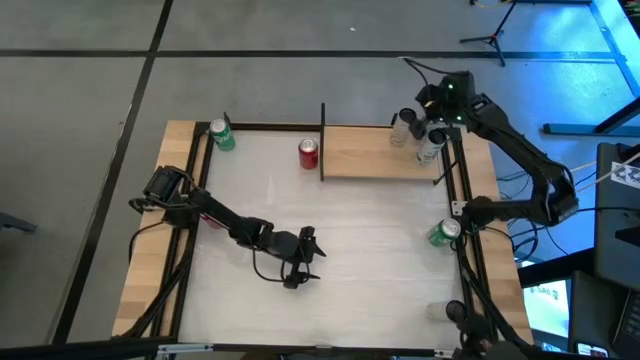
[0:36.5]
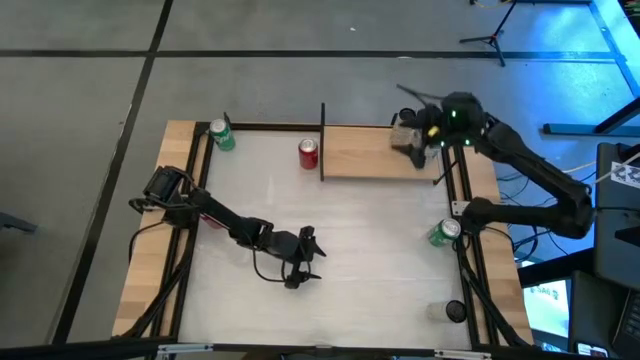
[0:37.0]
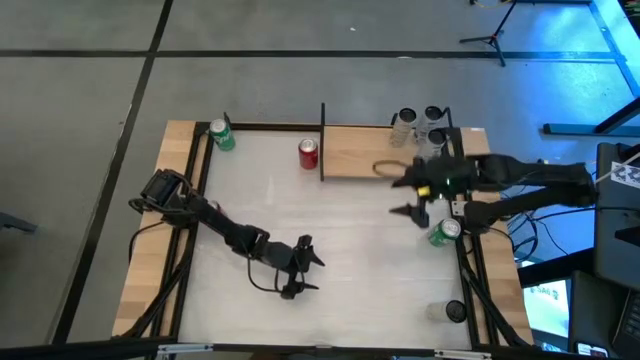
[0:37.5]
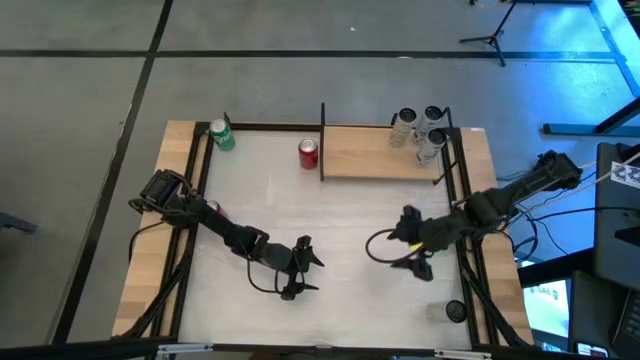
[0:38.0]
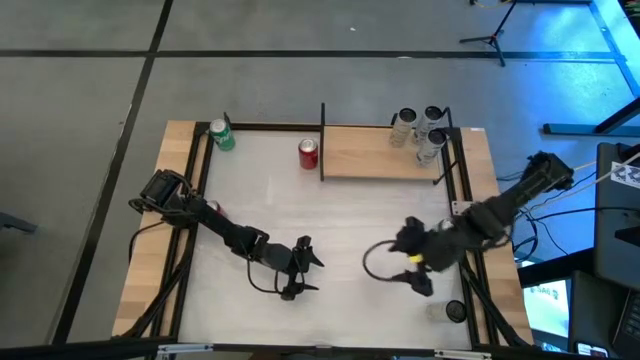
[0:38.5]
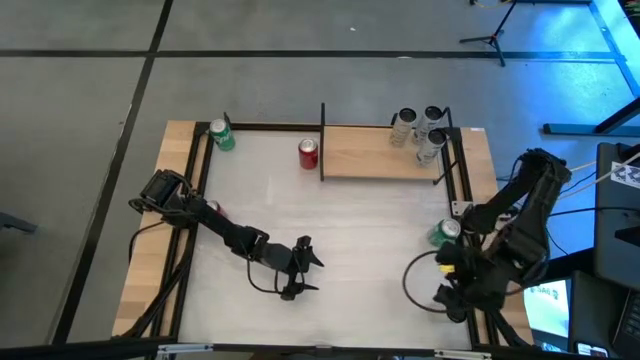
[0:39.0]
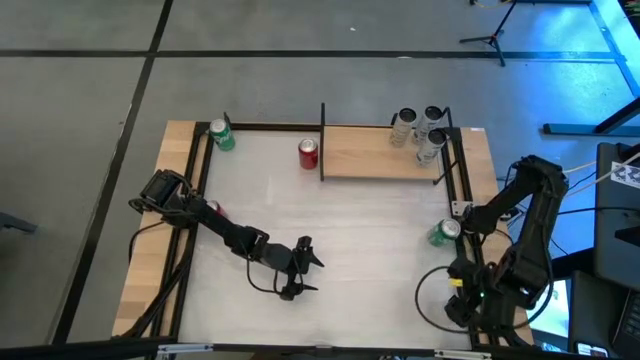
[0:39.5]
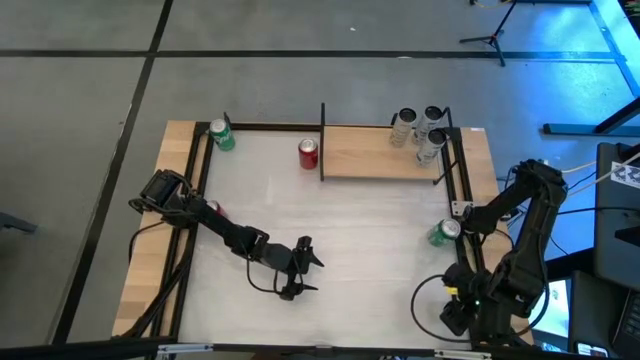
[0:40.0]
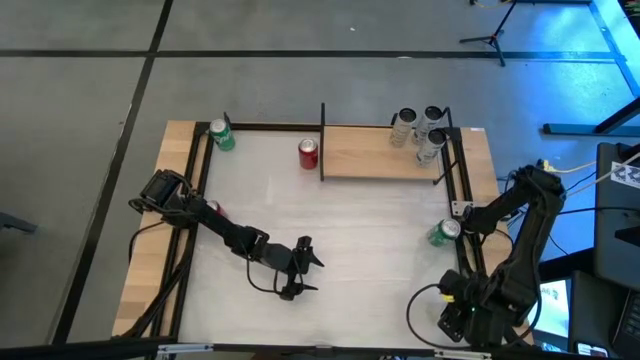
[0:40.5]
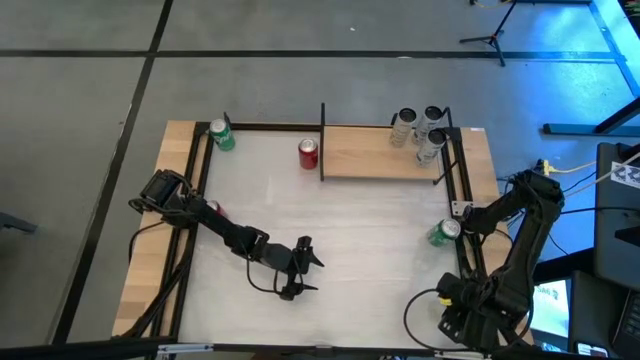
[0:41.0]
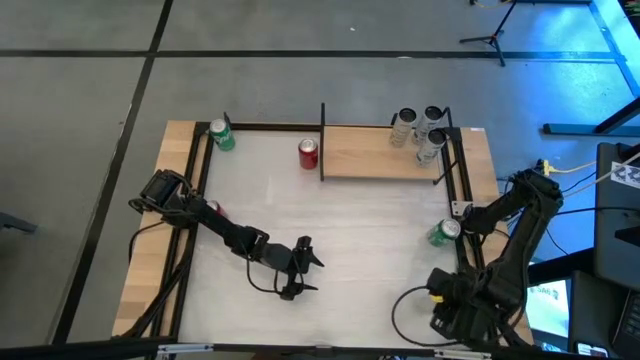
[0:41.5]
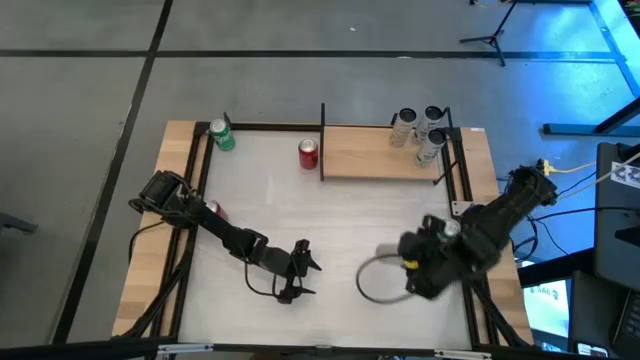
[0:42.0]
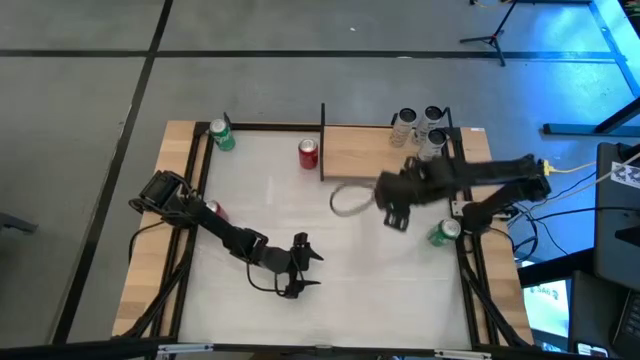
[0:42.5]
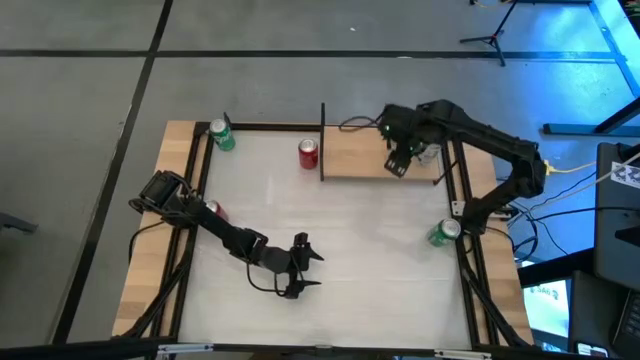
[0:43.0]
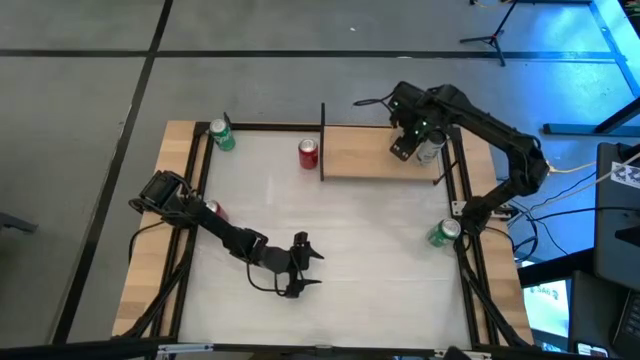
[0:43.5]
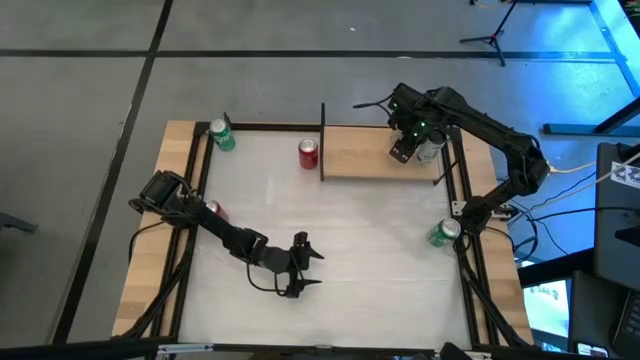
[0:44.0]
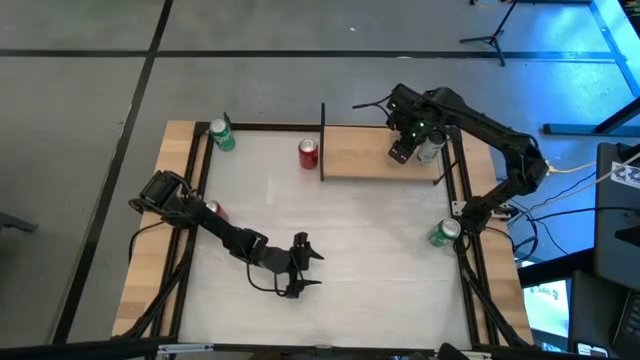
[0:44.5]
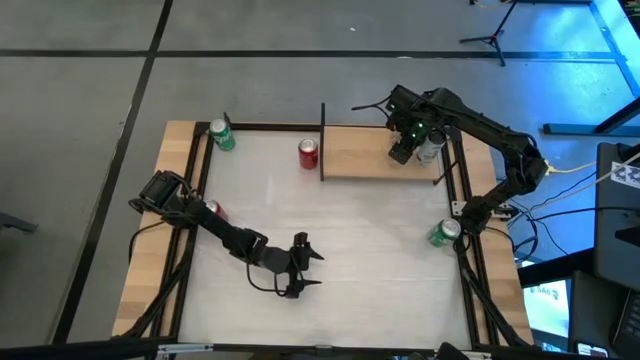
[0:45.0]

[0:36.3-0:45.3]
Task: Place canned beverage on shelf
Put the yellow soda can on the shelf aligned with the other white yellow soda can

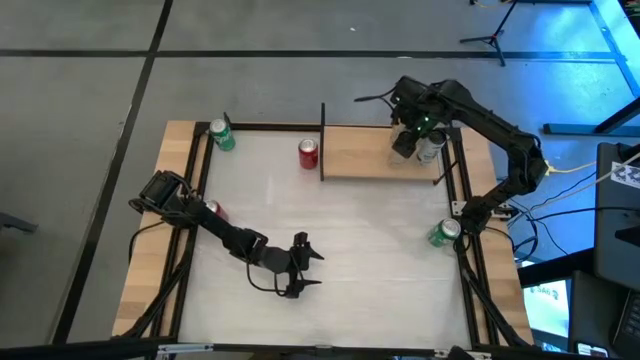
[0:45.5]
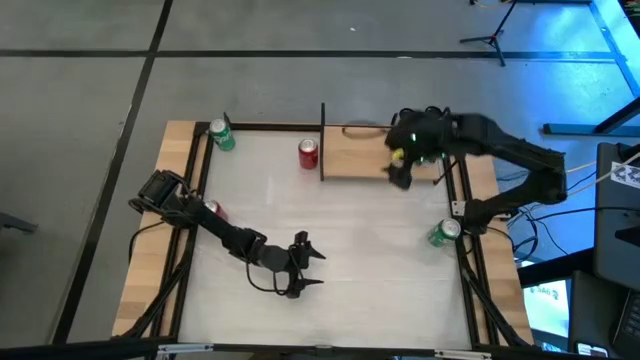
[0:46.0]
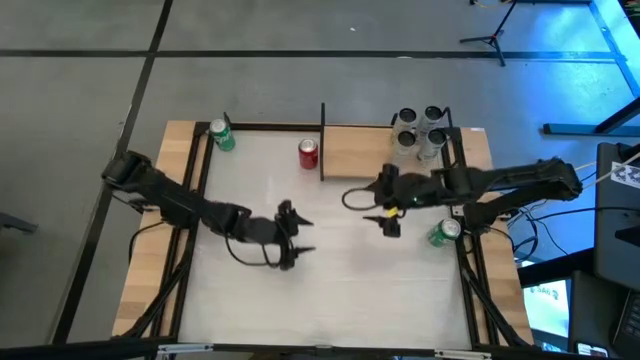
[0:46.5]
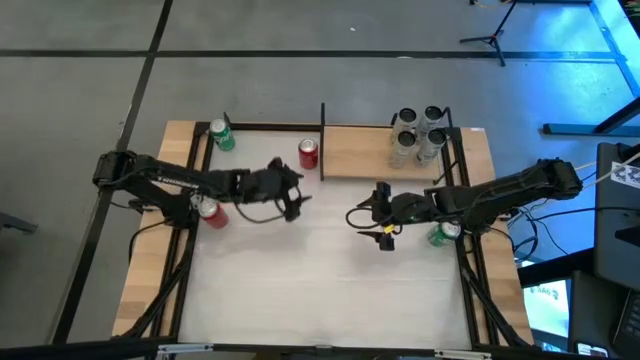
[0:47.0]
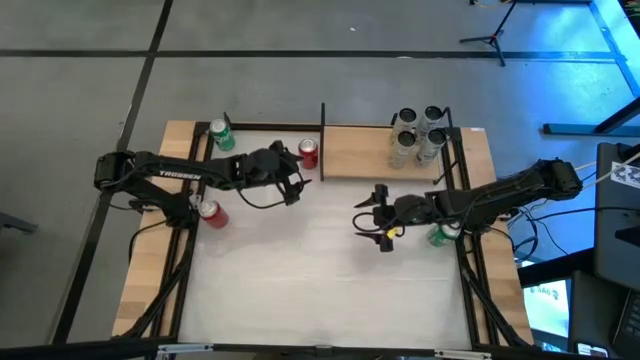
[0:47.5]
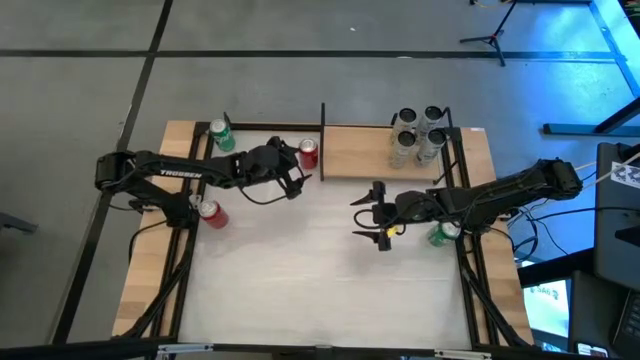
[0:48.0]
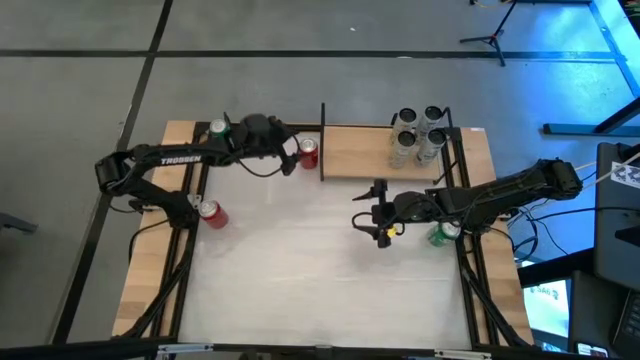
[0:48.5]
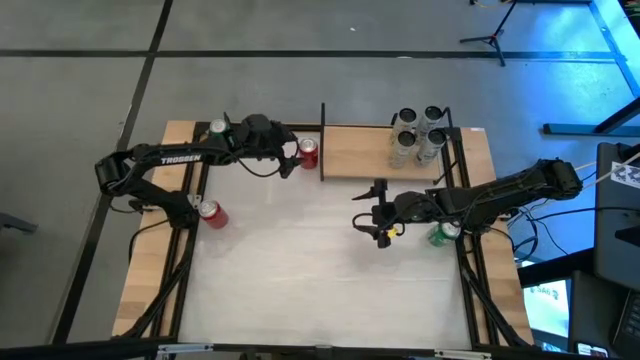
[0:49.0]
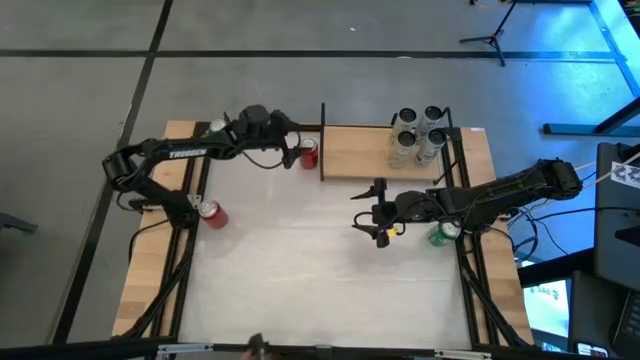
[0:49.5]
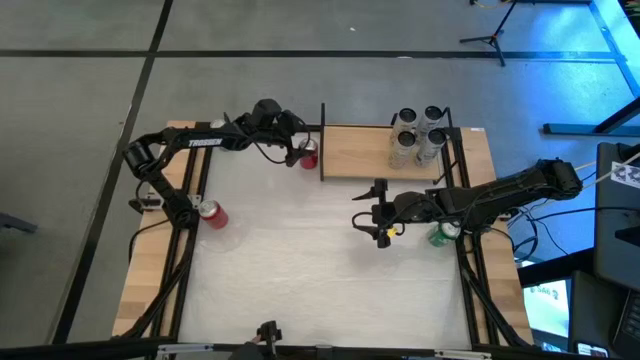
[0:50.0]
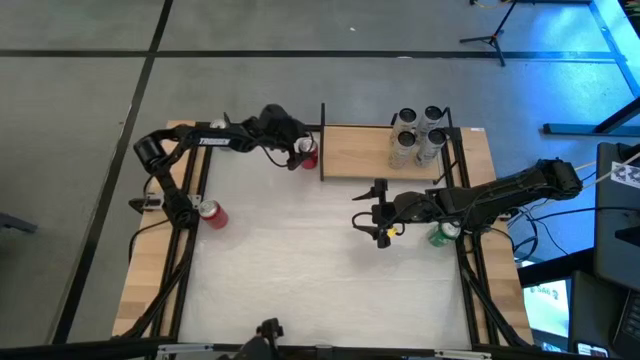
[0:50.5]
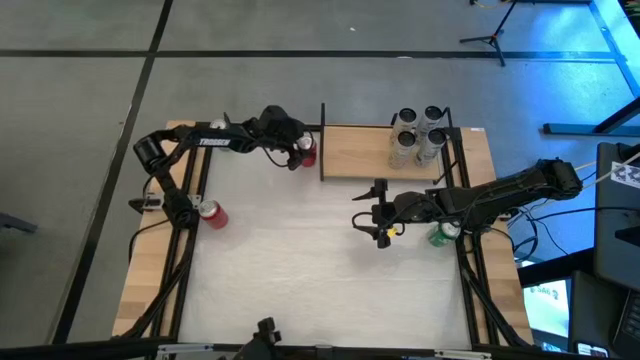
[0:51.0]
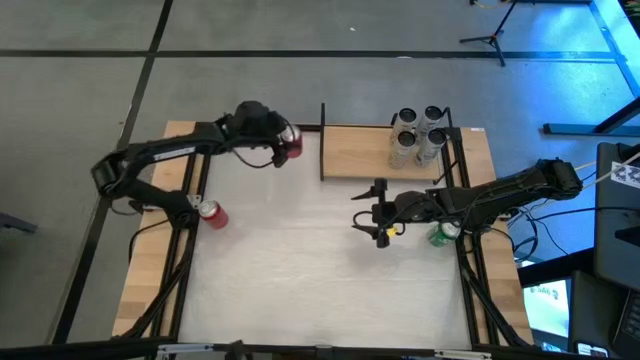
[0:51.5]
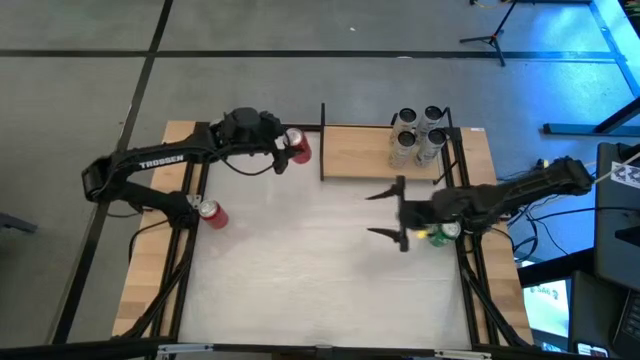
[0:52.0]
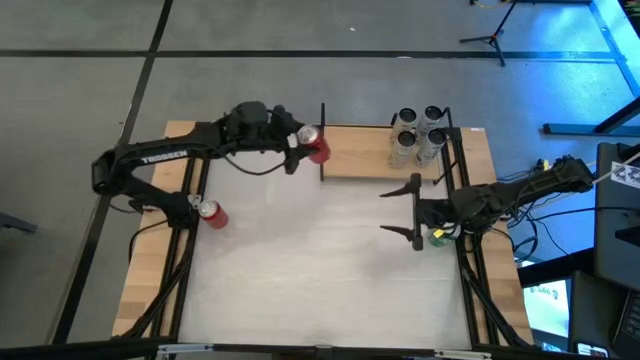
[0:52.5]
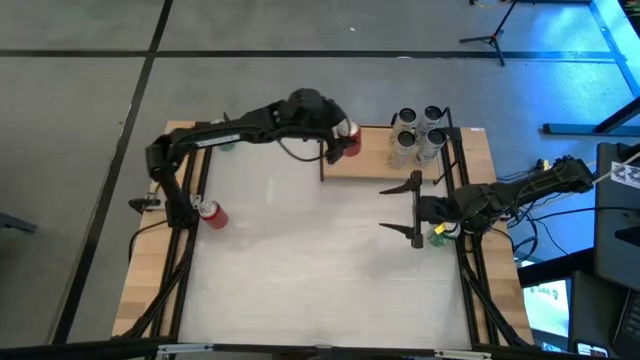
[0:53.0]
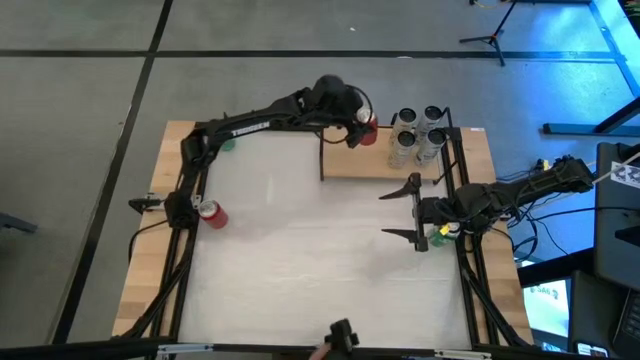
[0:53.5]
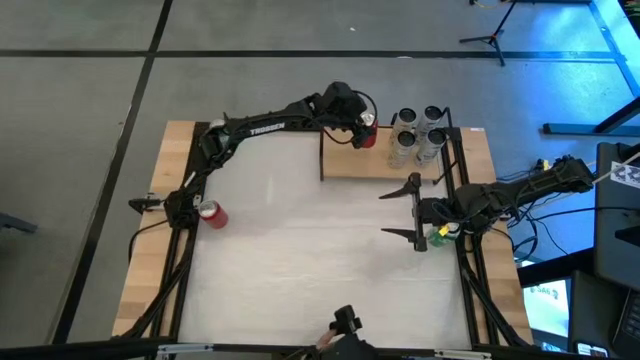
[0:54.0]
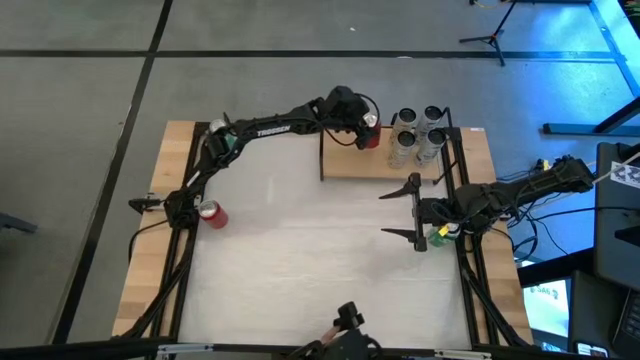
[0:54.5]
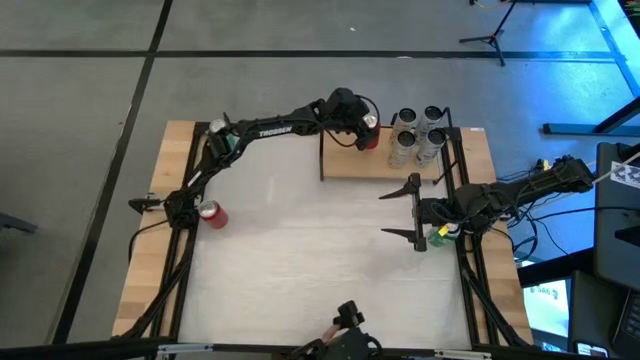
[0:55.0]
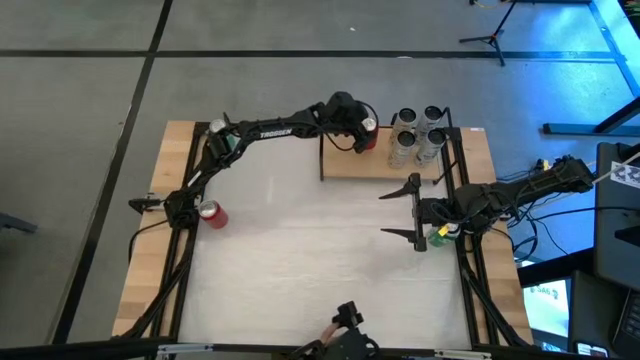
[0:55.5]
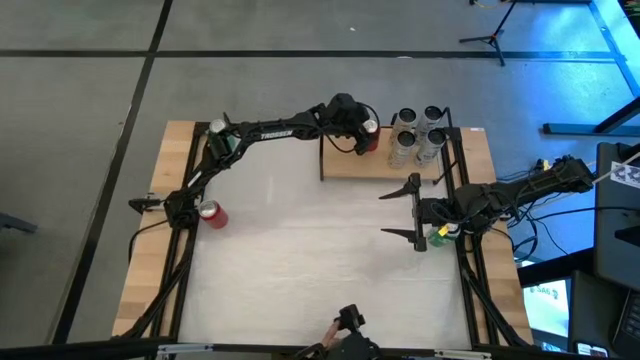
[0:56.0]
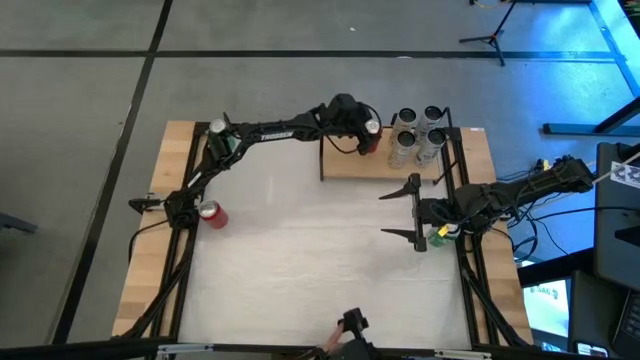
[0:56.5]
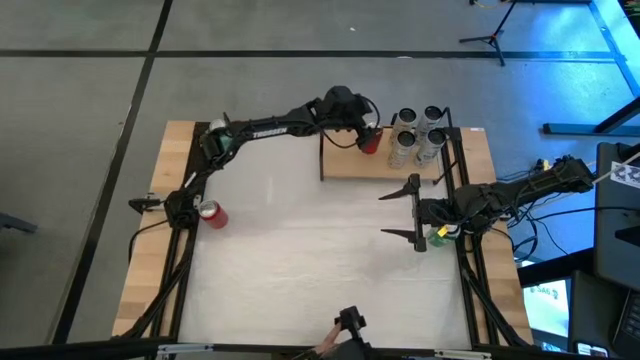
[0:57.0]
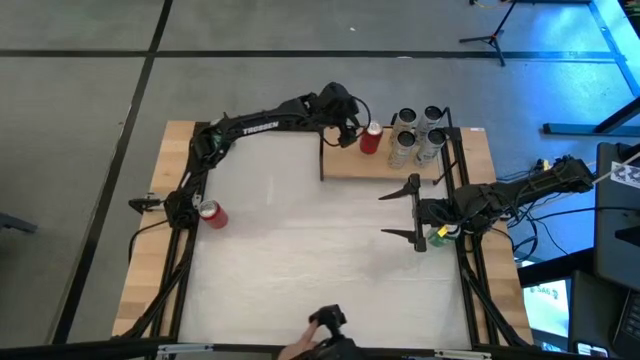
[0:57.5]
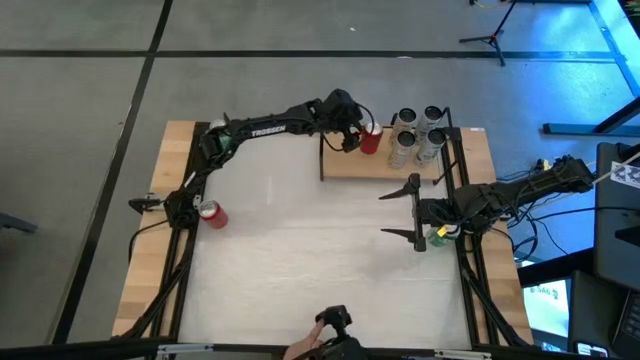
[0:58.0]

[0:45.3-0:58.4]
Put the right red soda can on the shelf
